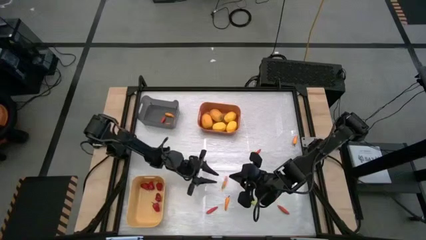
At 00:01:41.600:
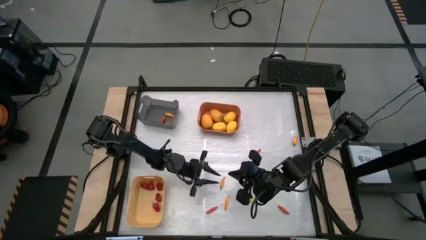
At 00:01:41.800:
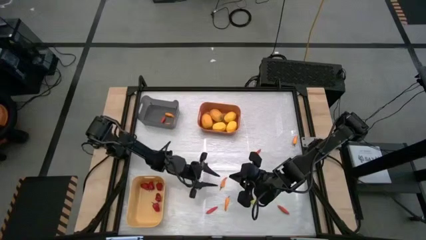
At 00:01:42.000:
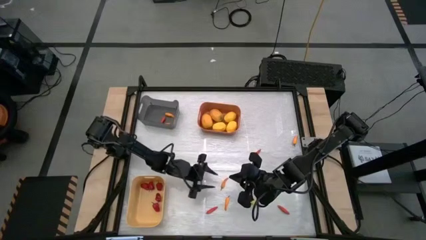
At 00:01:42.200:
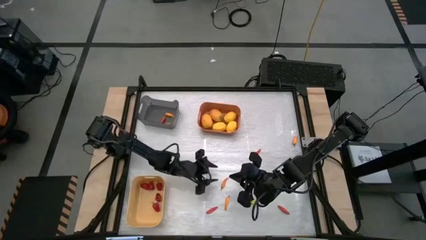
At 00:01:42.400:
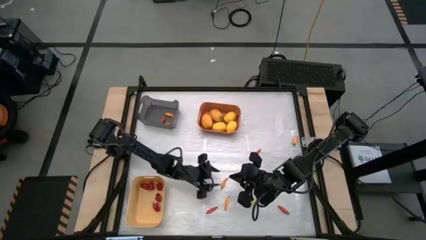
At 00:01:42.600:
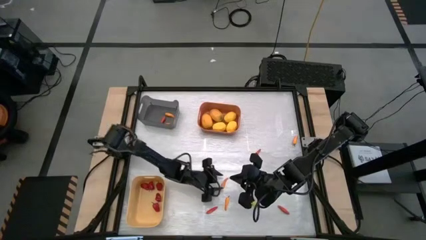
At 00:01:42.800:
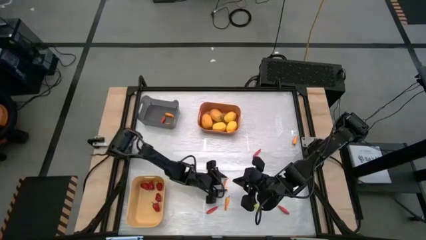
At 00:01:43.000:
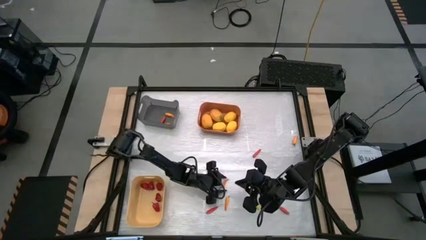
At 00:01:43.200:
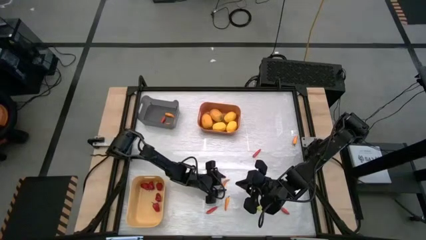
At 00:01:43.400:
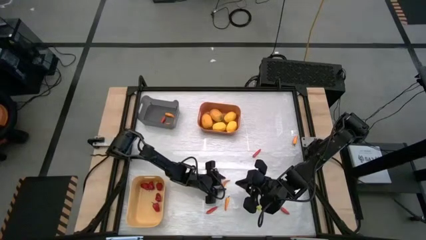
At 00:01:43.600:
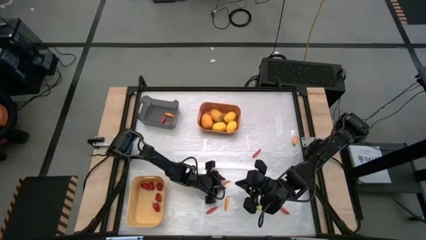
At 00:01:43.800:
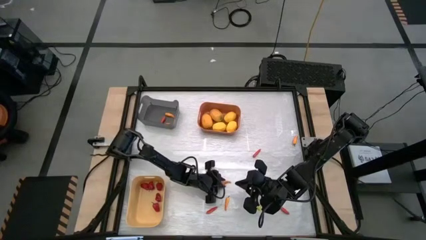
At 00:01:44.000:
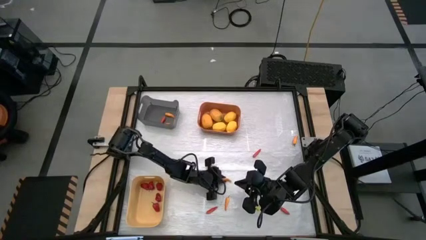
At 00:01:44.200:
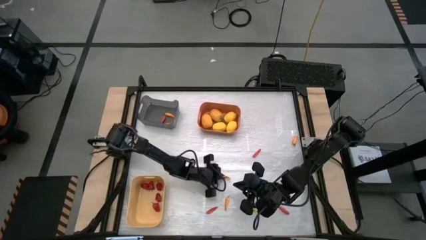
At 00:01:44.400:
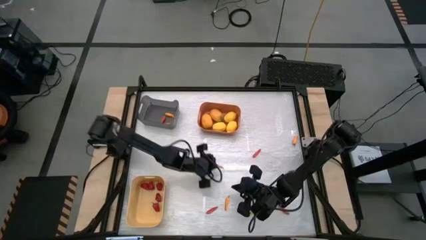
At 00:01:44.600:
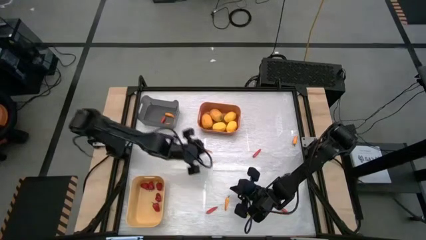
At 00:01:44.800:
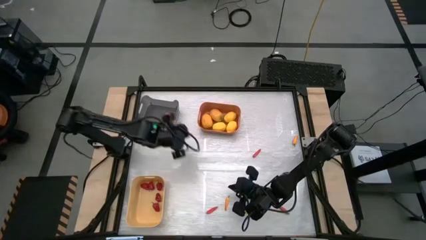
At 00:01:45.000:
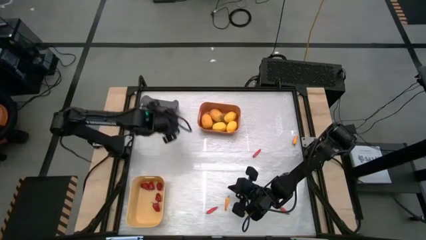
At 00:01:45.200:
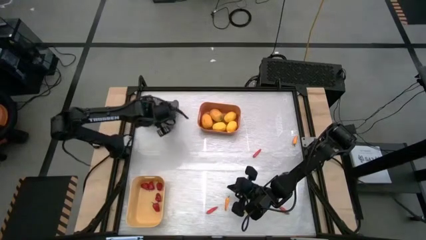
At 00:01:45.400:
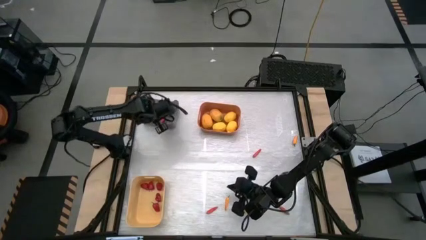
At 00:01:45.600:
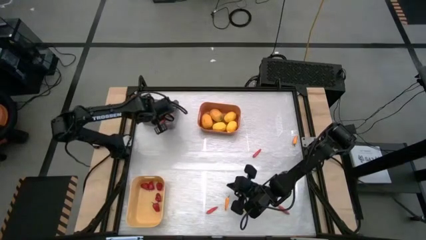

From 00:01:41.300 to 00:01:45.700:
Task: Sort produce into baskets
Put the yellow chili pepper into the black bin

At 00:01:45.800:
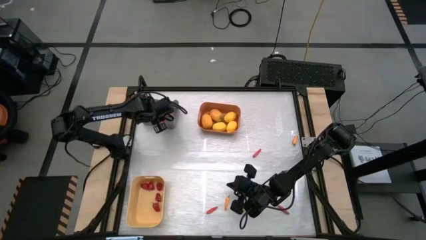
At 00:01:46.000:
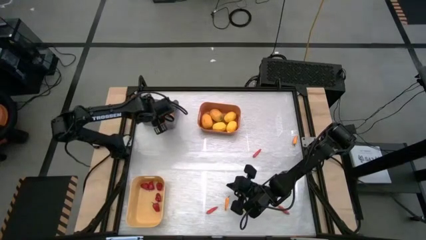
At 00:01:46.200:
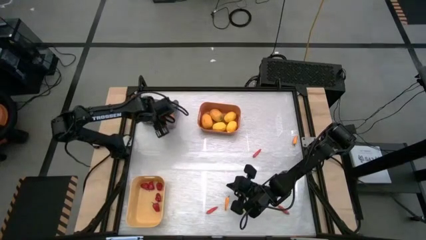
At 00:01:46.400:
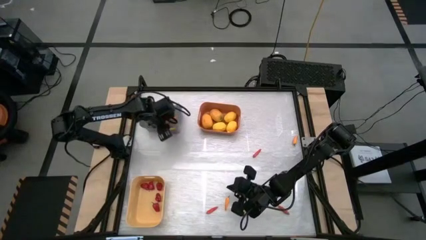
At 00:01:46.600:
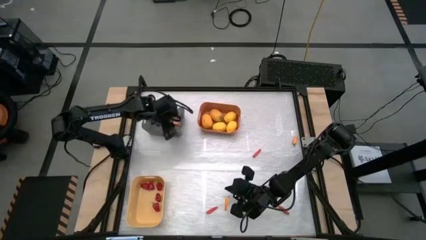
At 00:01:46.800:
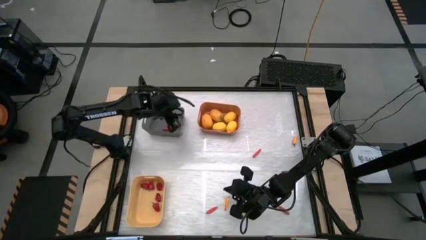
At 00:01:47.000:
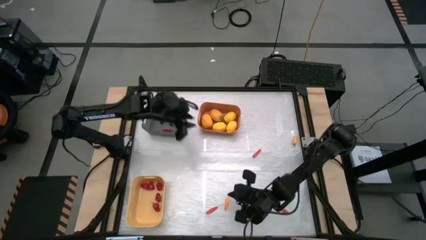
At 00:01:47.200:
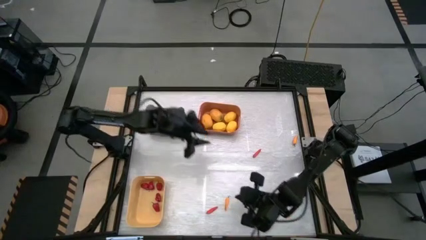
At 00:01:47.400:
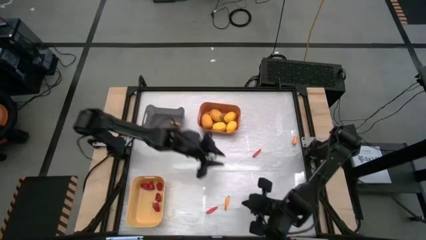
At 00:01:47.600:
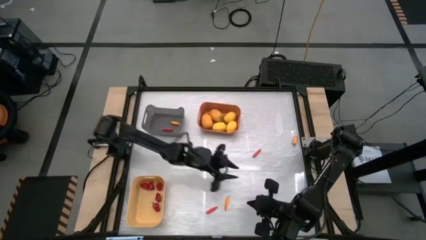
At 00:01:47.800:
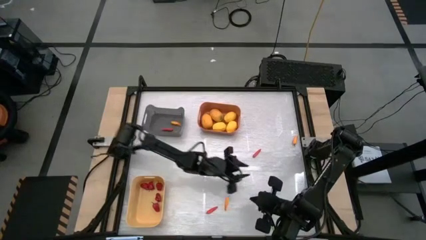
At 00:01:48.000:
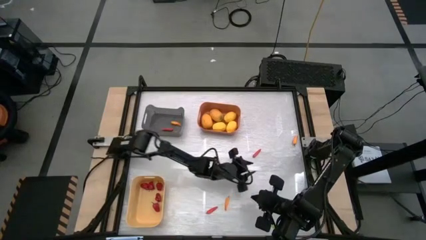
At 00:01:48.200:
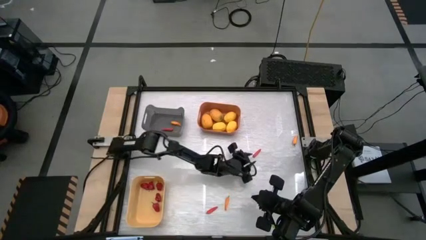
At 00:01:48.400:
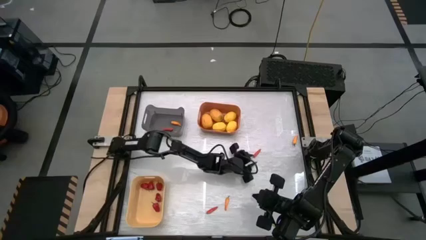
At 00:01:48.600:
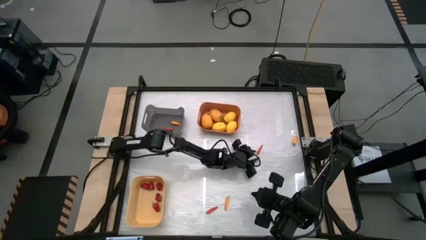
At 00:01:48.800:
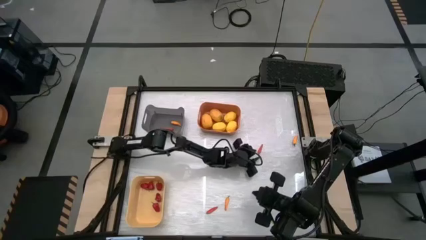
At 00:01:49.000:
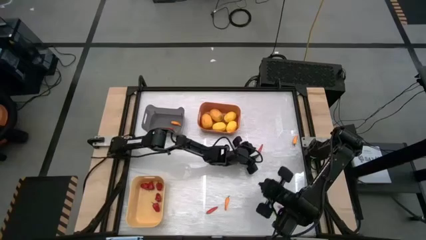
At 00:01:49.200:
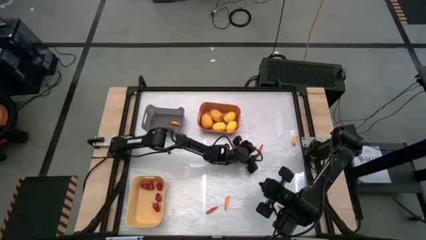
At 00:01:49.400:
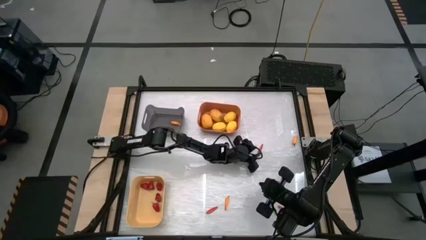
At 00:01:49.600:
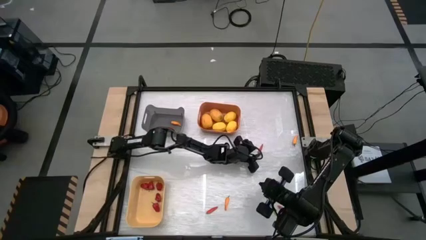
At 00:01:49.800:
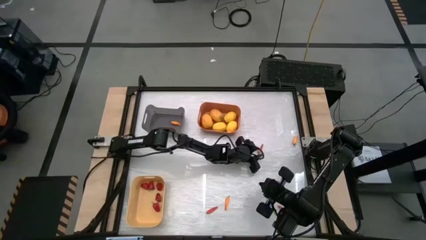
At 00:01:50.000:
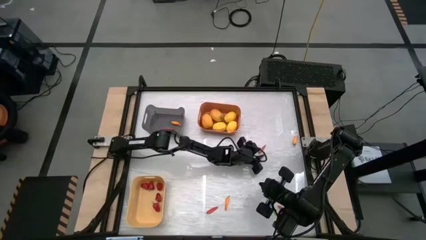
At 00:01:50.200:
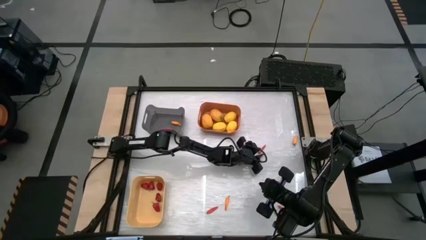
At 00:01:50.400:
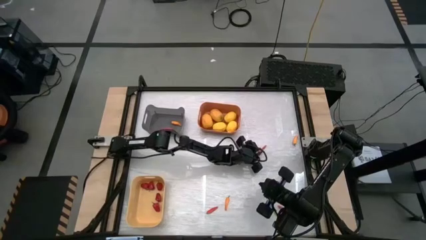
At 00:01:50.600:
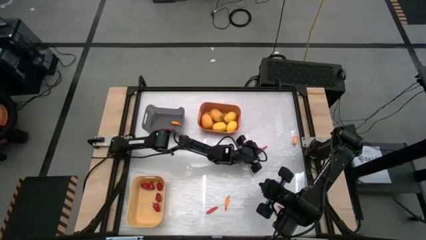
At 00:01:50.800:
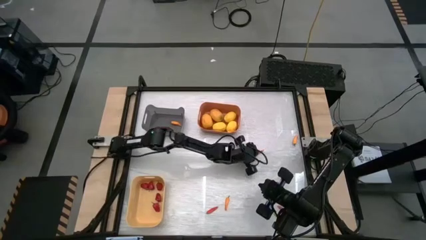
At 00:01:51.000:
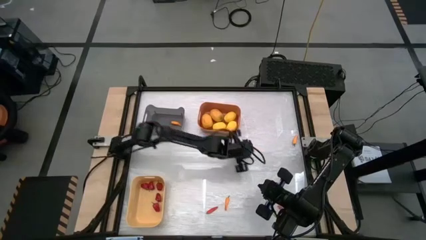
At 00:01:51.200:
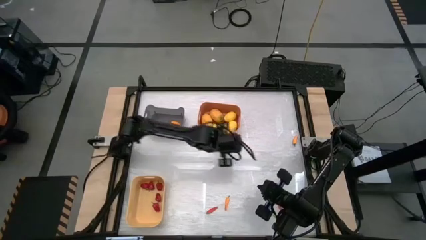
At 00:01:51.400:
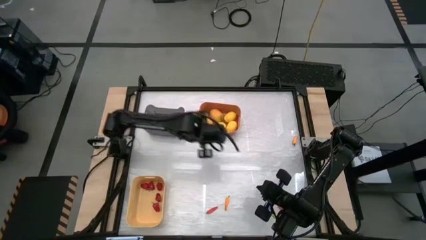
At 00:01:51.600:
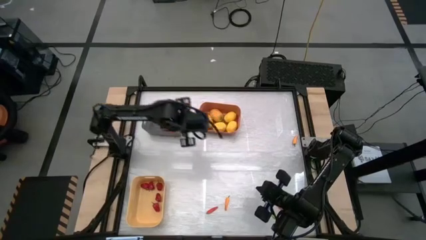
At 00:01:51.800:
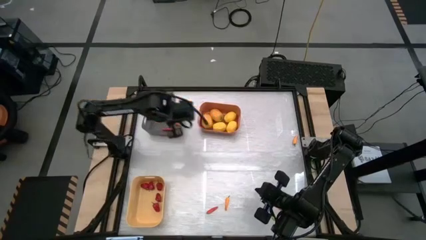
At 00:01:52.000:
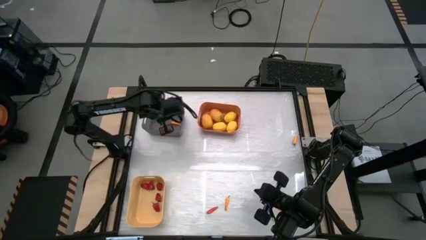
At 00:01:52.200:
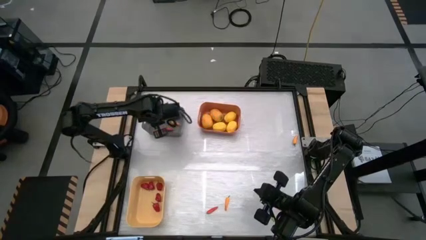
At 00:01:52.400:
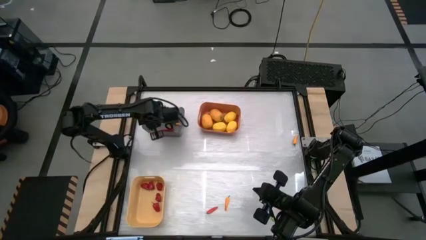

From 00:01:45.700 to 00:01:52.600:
Put the orange chili pepper into the black bin

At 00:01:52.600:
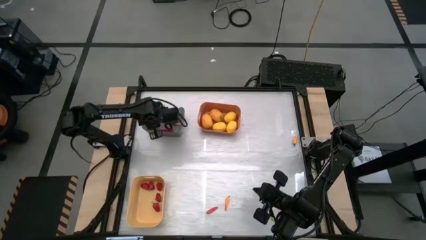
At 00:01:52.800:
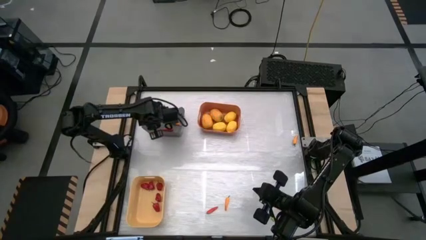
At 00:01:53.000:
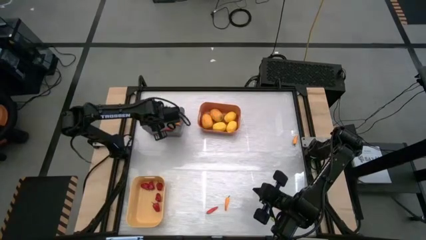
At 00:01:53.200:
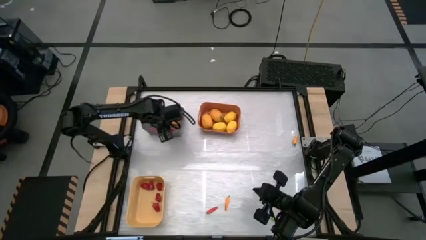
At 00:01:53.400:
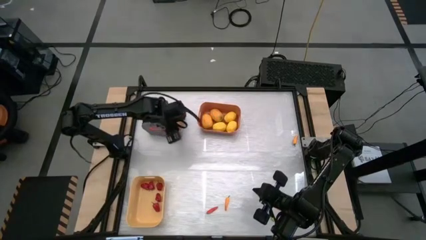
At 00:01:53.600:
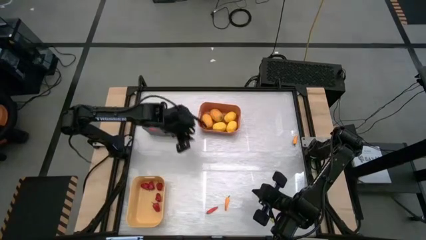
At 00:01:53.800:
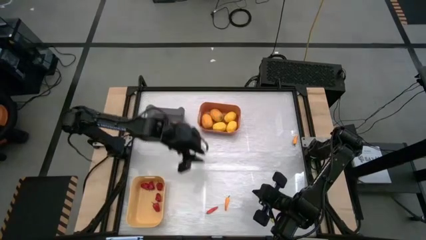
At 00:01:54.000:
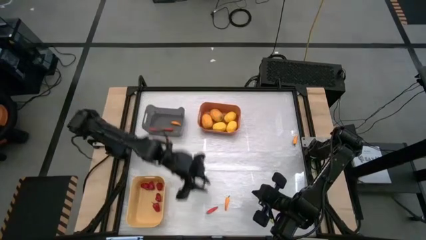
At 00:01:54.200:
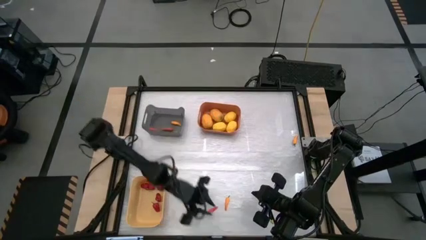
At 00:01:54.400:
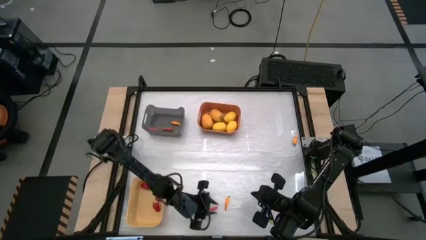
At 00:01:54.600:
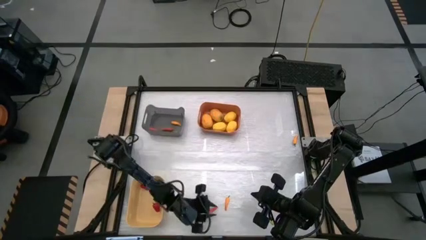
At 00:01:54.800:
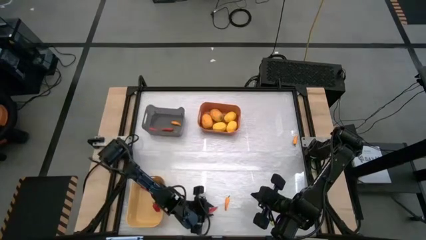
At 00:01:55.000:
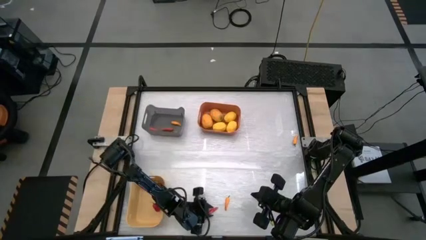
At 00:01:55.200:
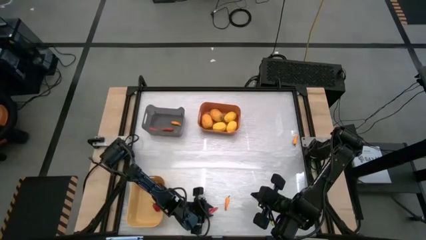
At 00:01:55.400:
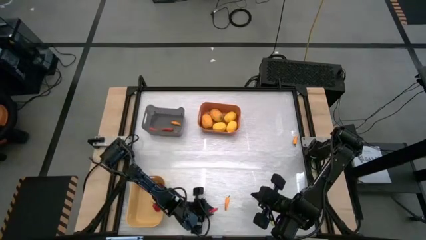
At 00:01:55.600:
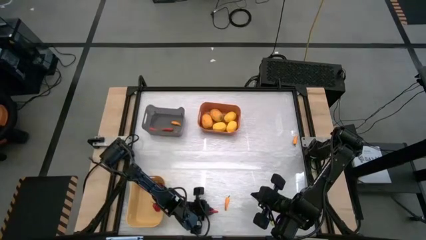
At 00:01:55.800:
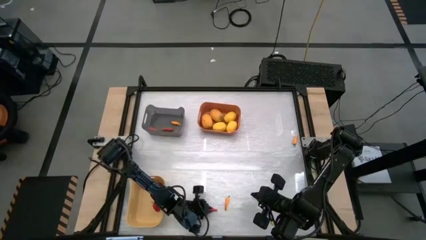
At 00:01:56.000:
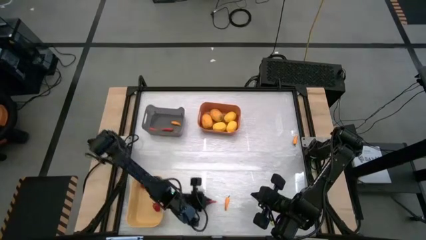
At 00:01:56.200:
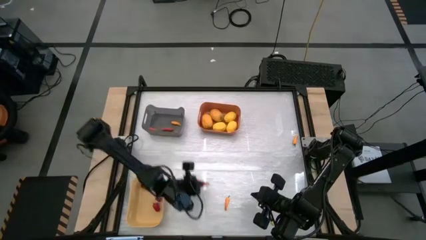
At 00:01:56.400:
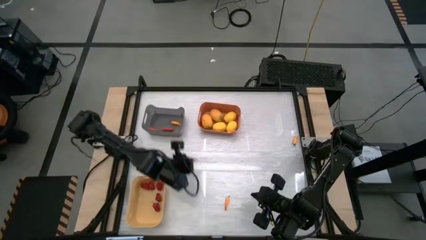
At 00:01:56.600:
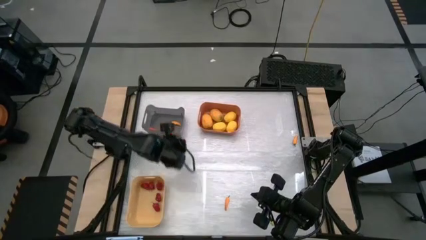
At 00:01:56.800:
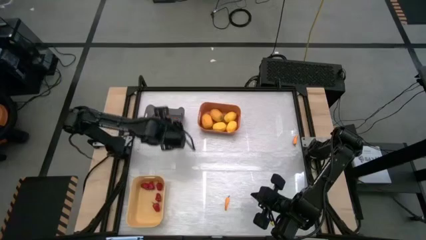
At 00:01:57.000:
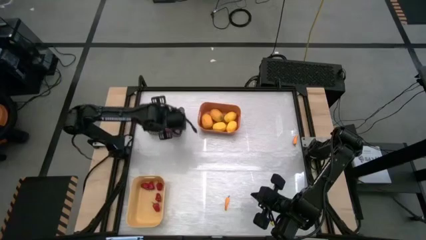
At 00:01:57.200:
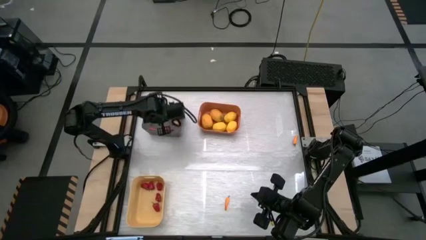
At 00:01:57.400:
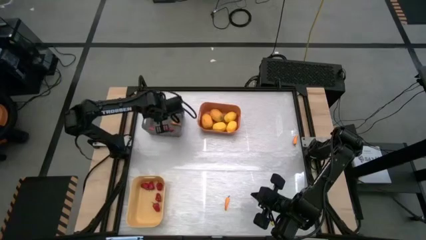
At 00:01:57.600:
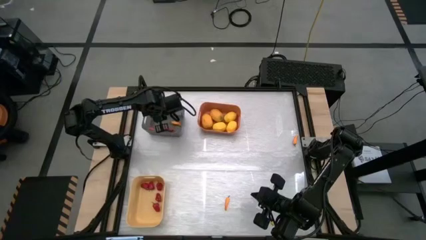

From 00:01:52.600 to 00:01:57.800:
Put the orange chili pepper into the black bin
